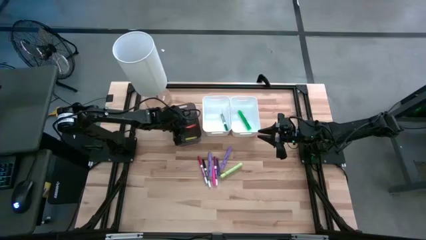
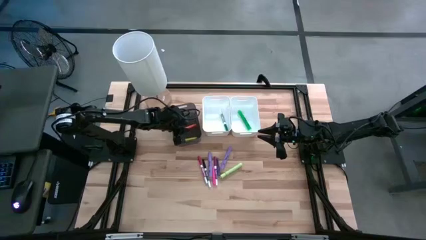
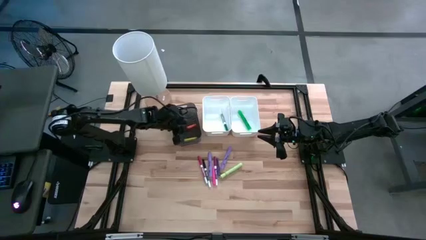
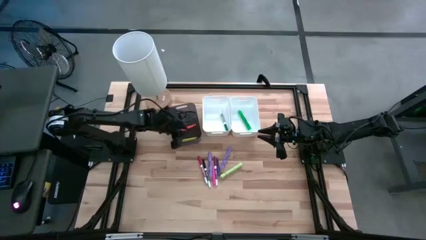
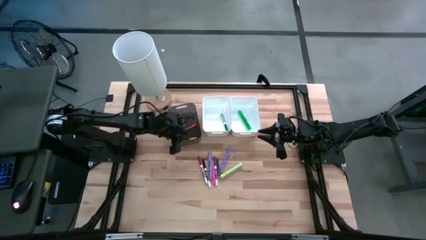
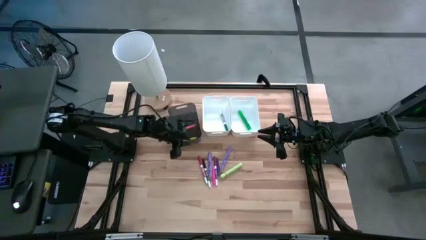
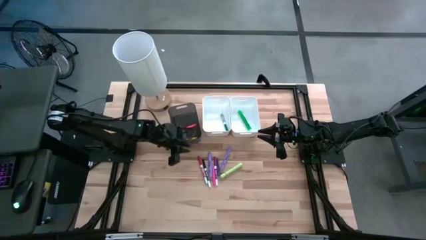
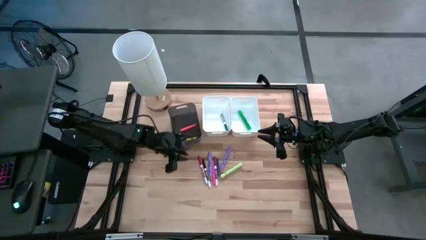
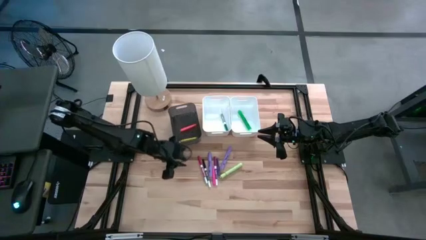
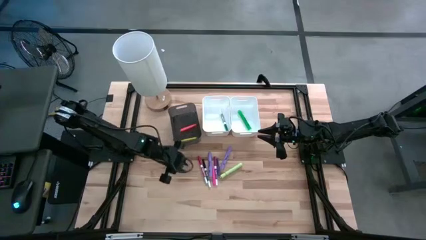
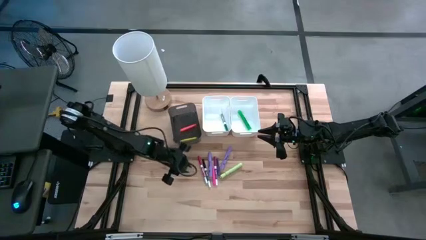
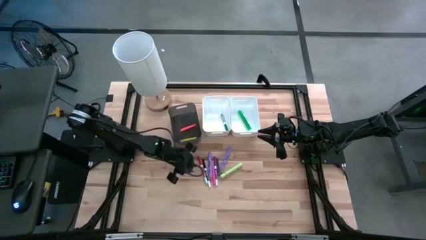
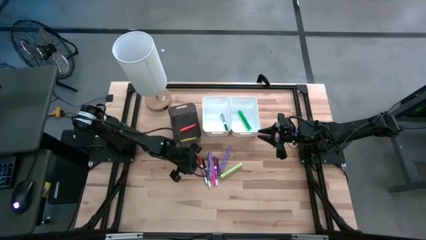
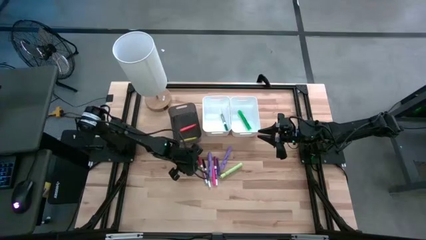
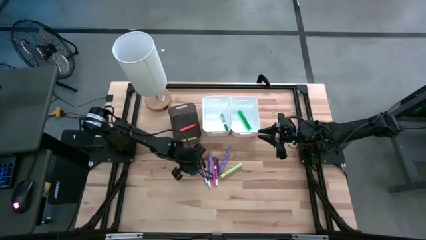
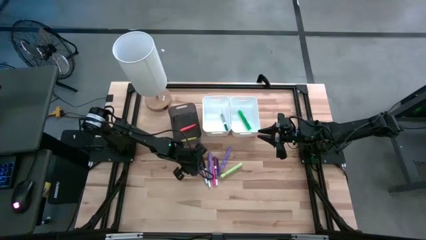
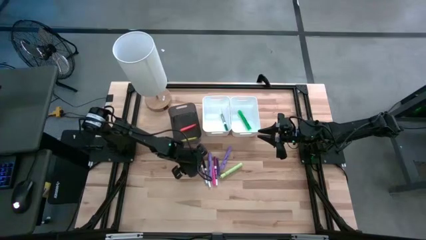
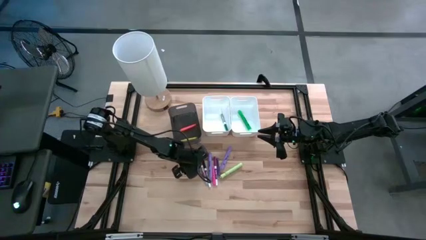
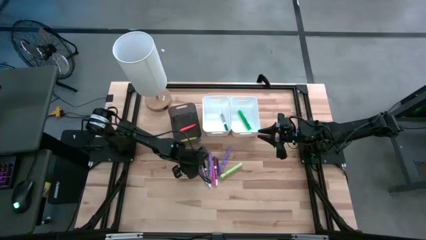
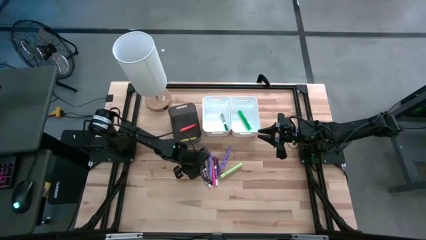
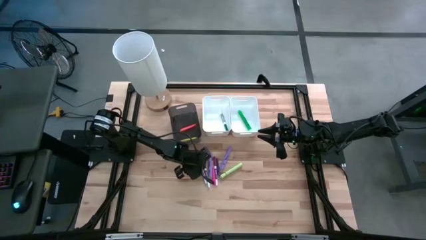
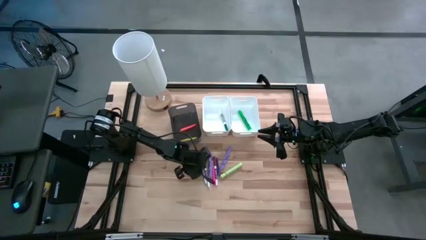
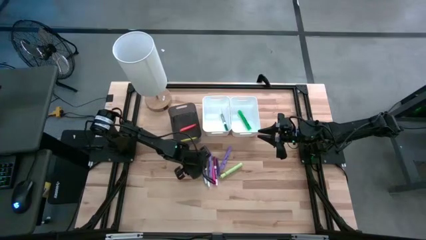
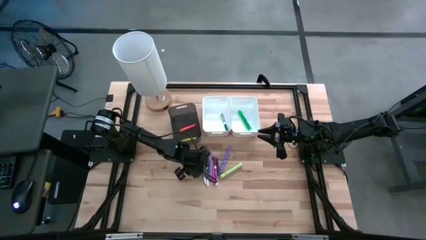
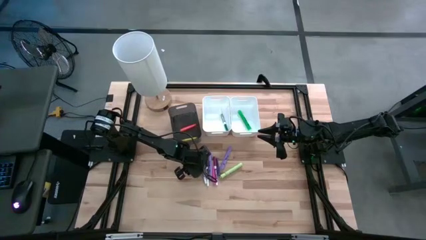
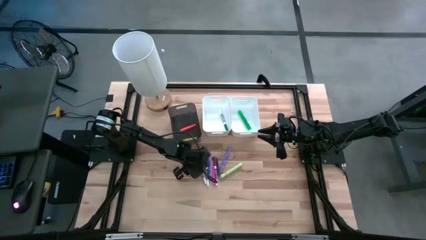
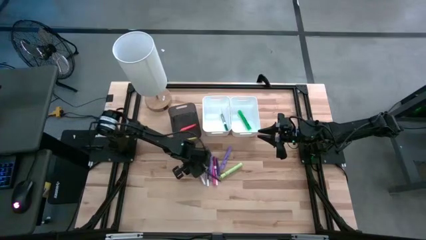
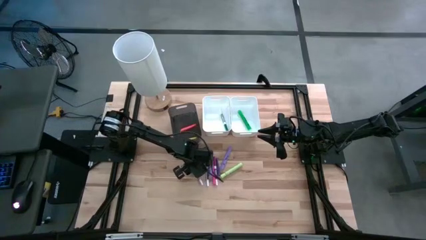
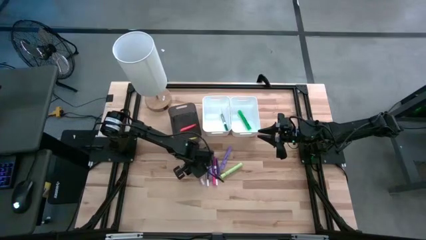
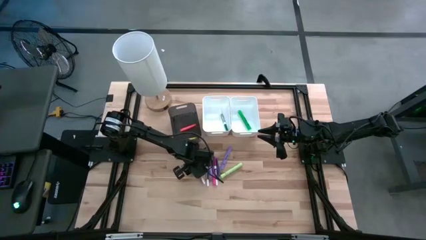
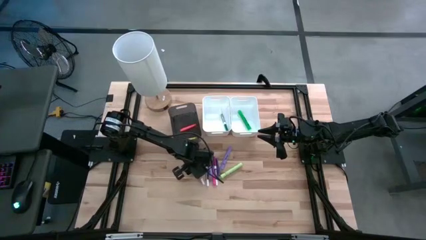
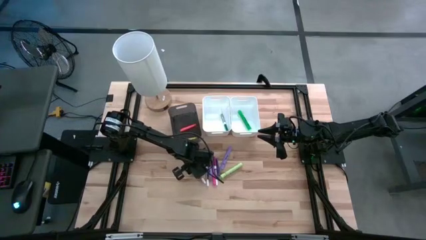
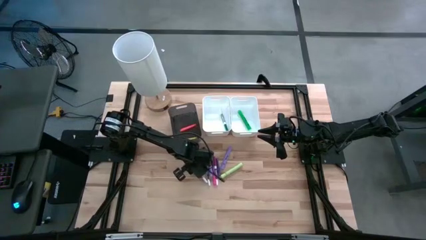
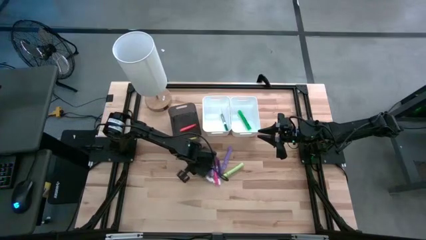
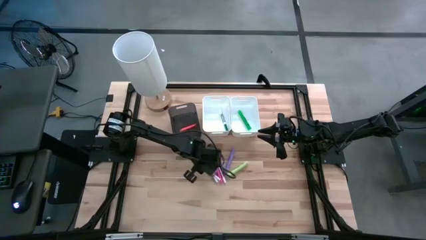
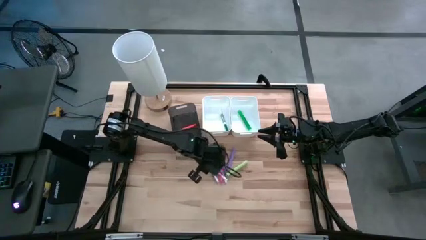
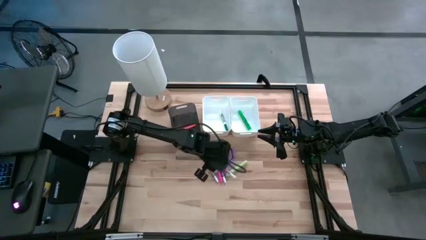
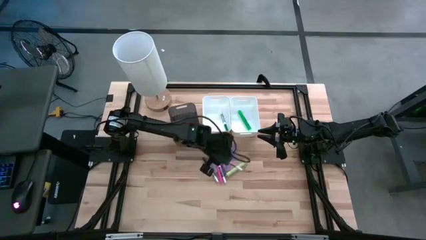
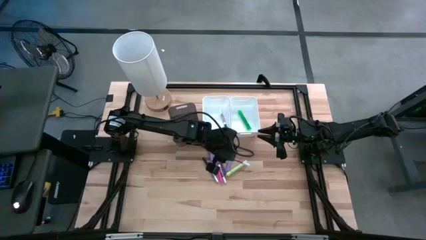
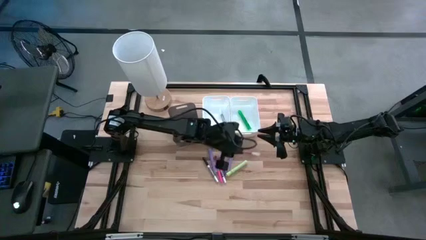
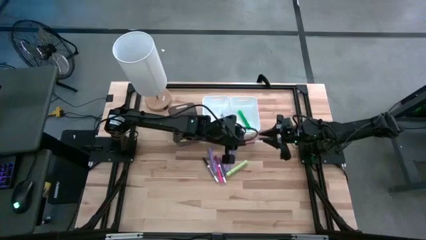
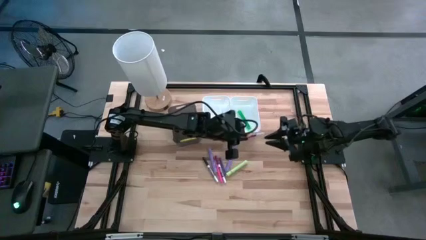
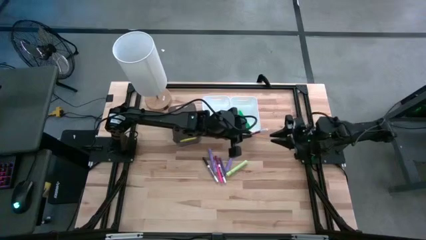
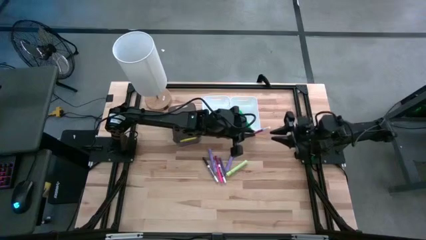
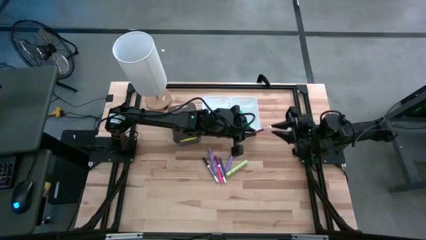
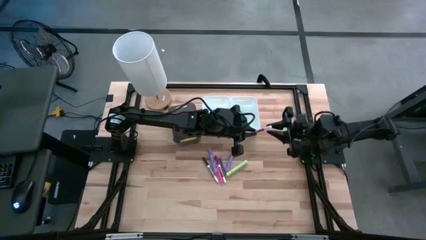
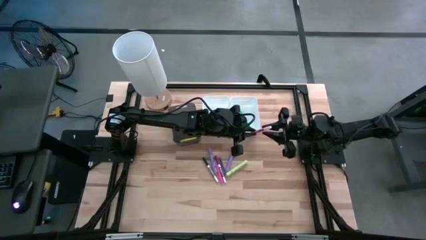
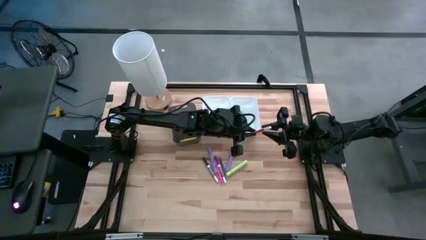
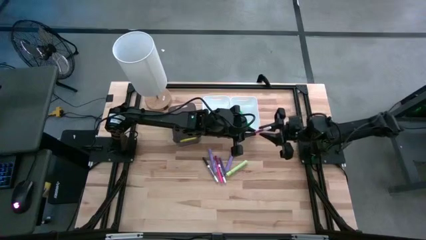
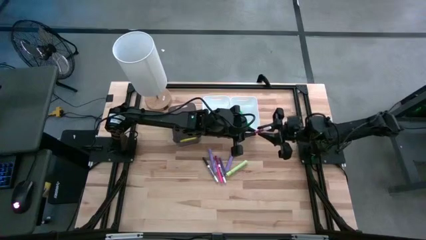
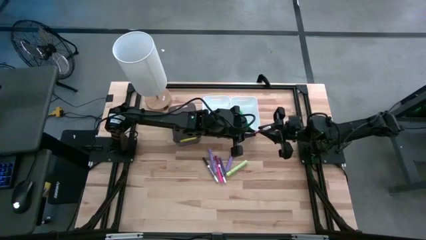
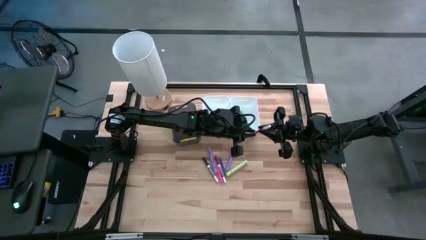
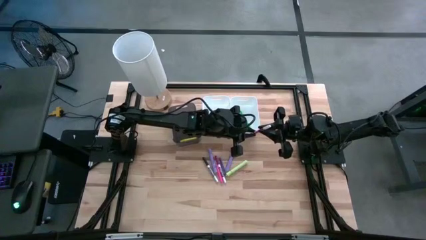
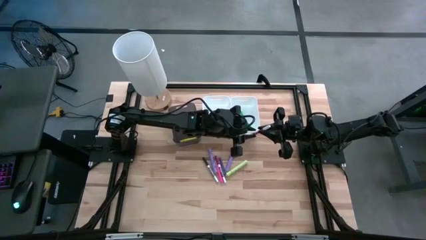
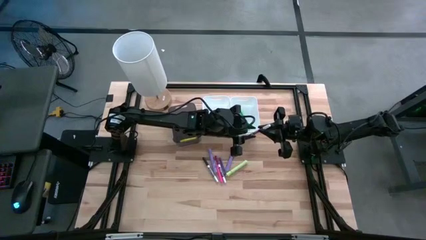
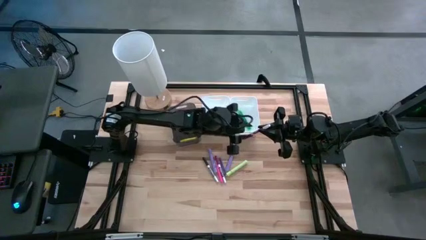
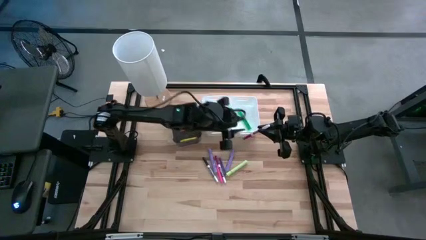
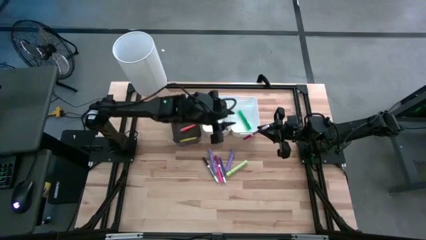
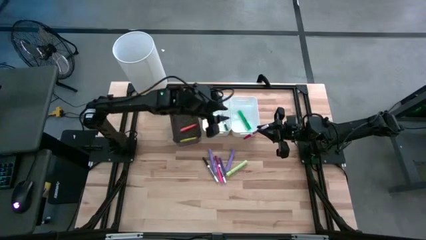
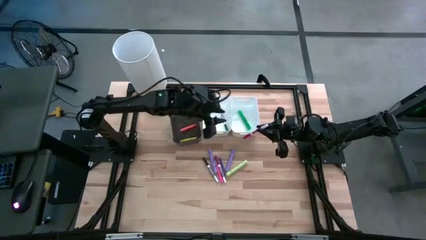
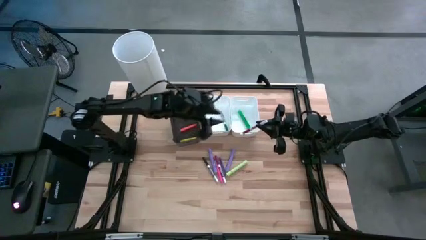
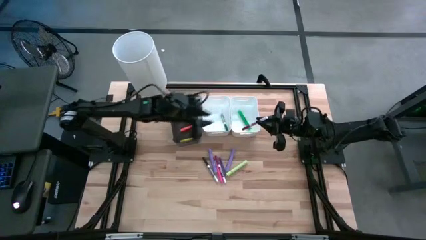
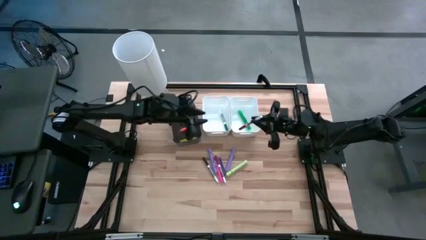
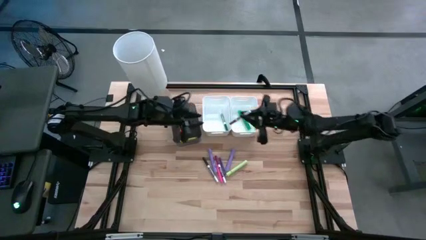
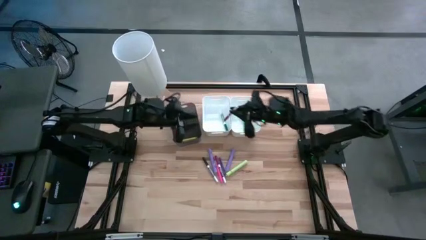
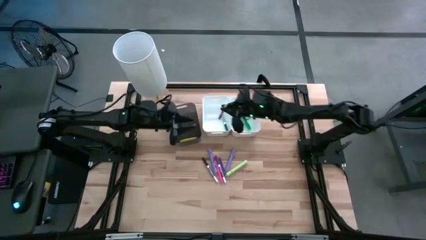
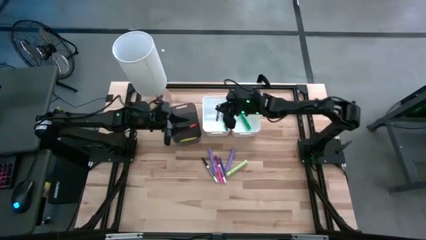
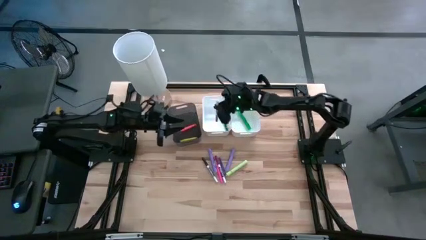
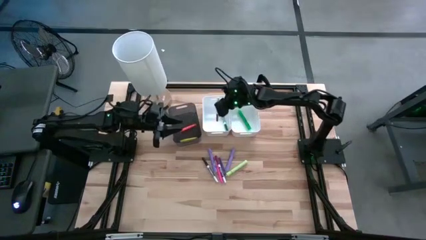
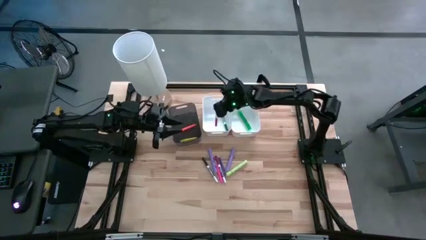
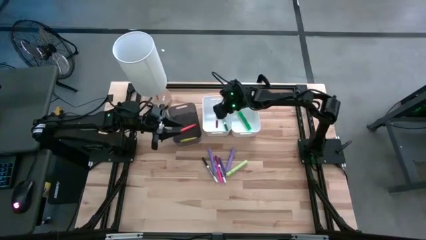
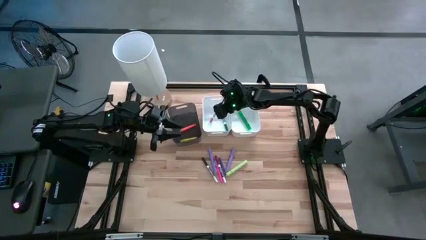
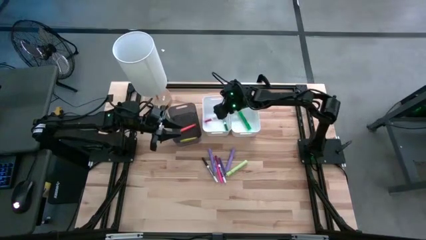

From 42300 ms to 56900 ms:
Task: Pick & Place Markers
Put the red marker pen into the left white bin
